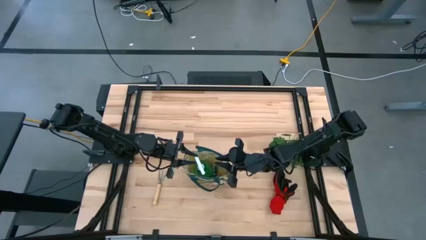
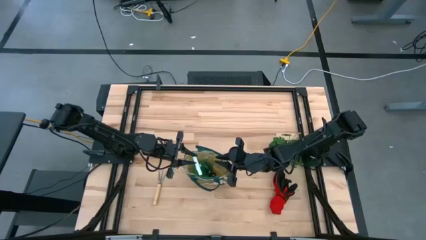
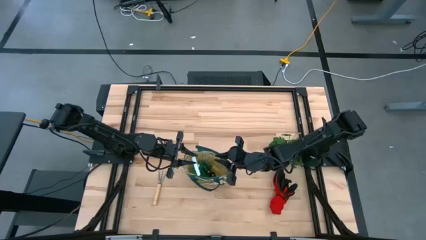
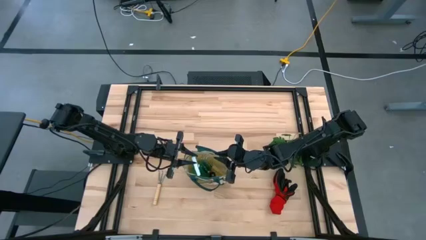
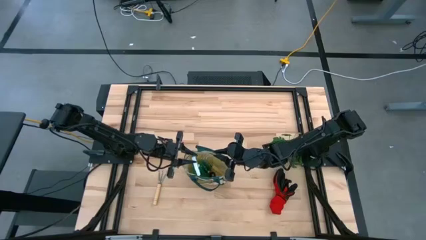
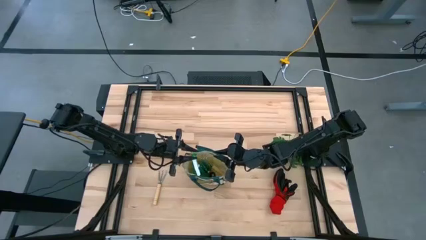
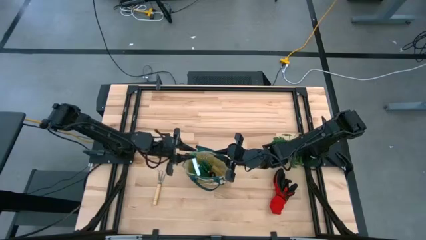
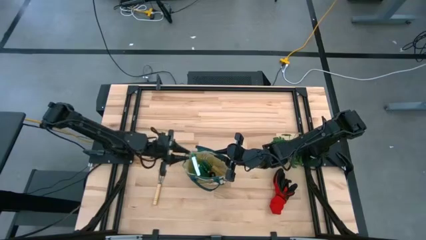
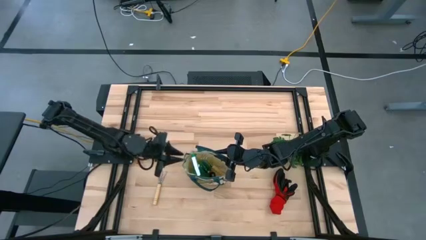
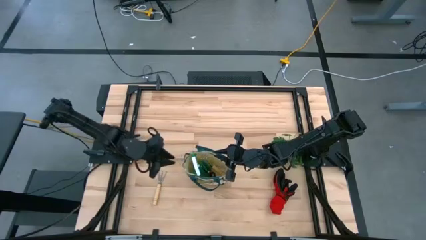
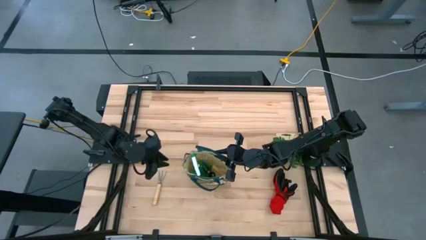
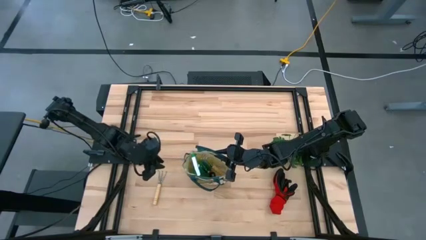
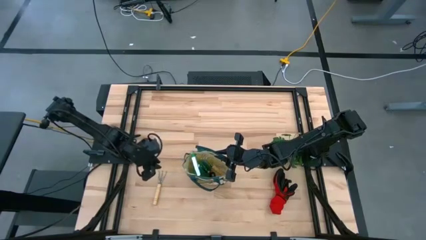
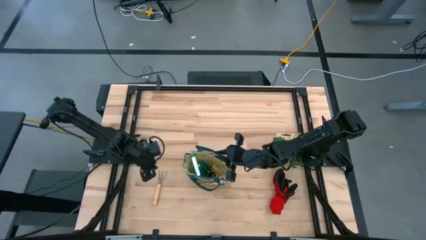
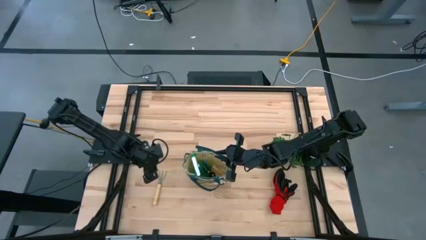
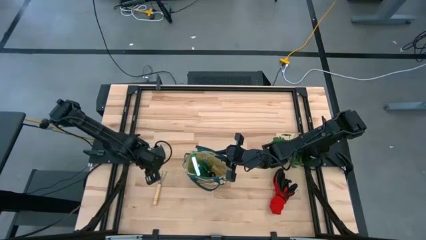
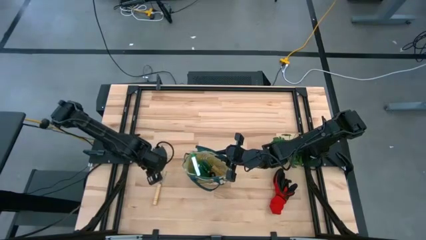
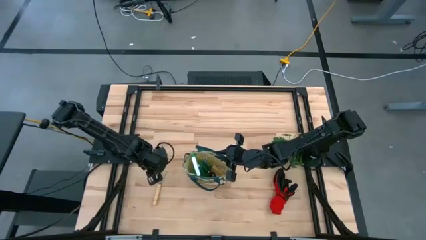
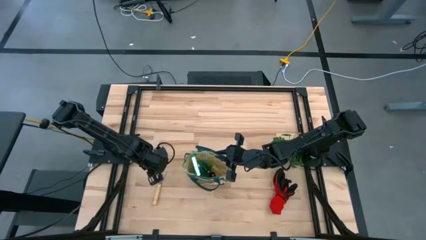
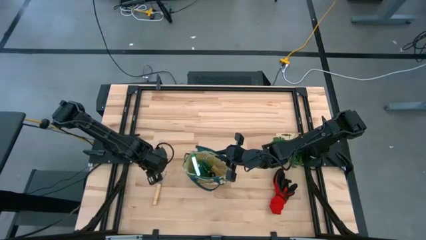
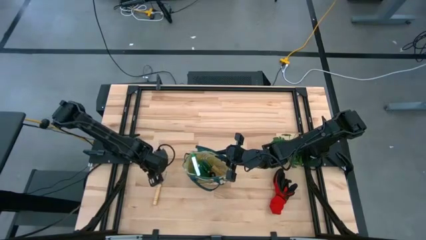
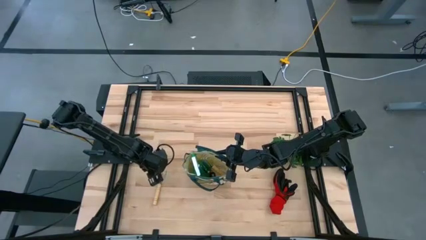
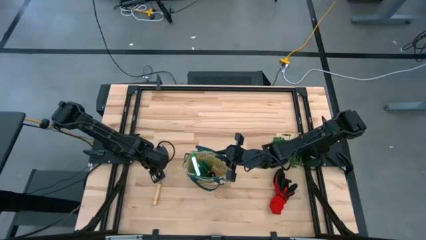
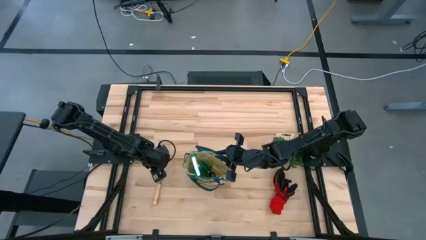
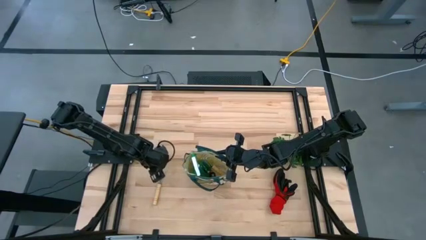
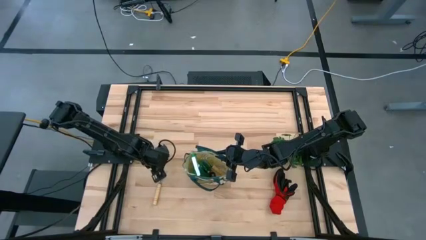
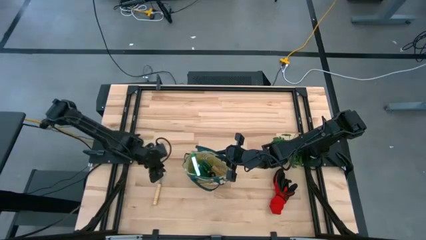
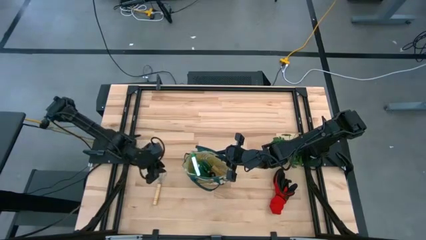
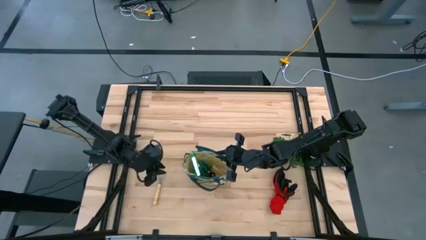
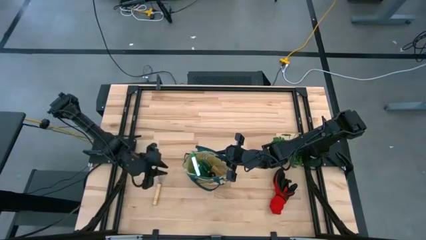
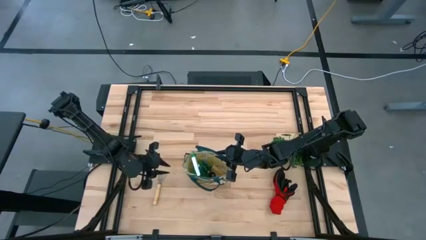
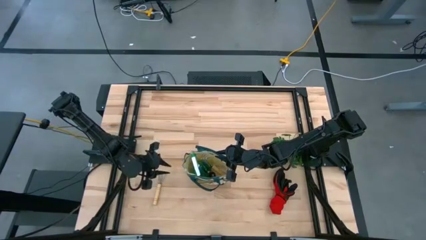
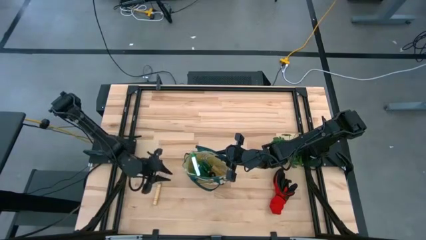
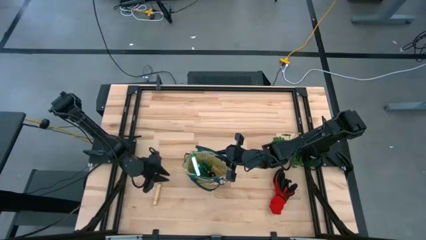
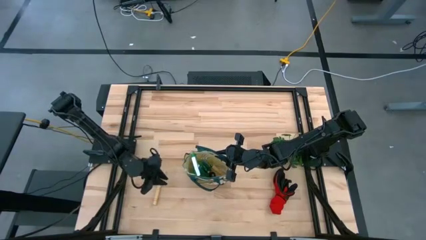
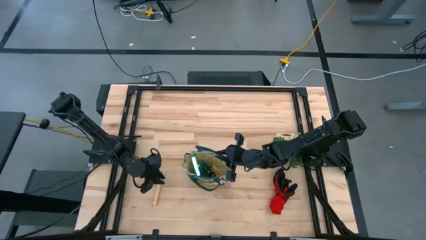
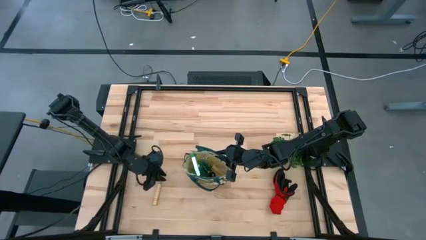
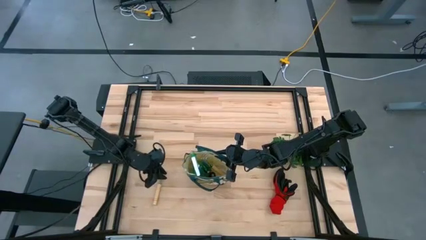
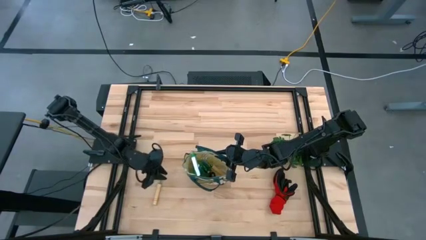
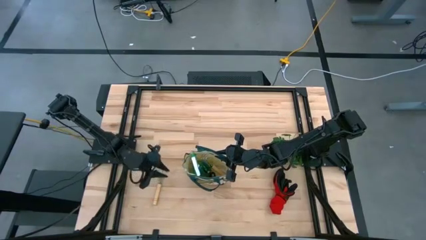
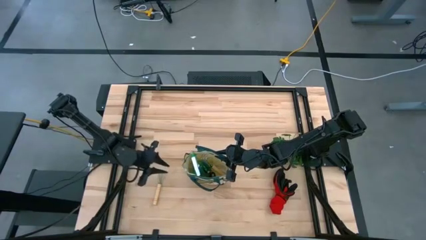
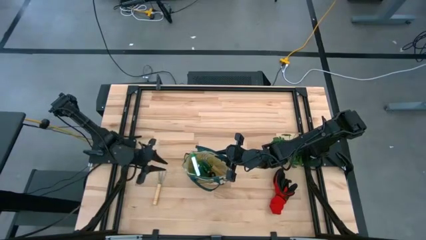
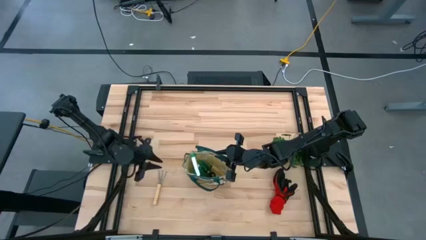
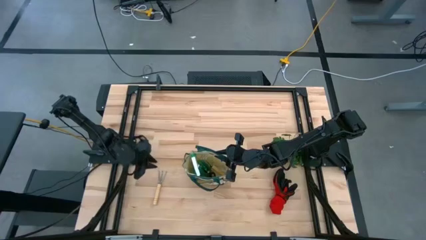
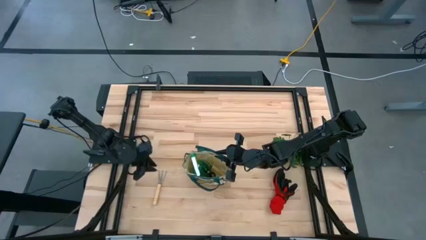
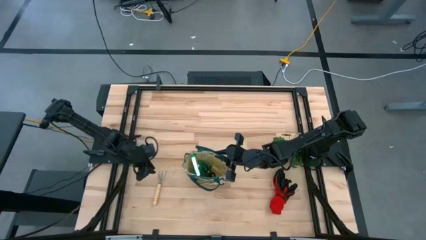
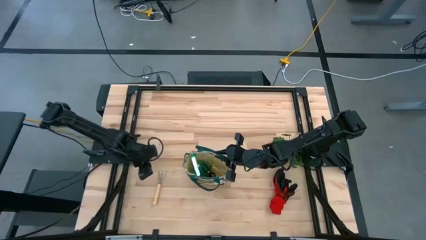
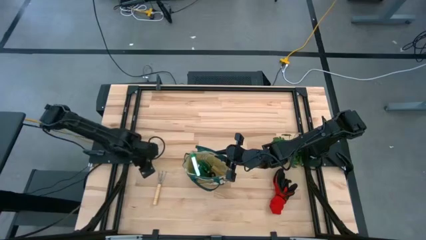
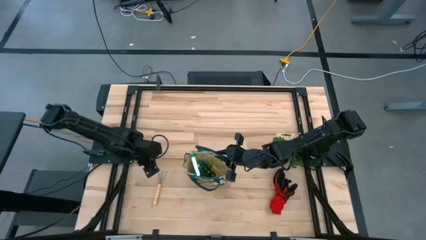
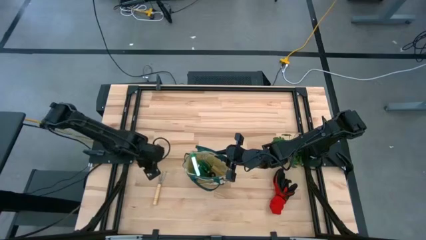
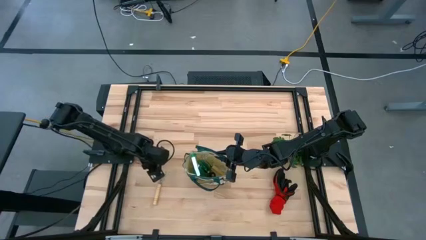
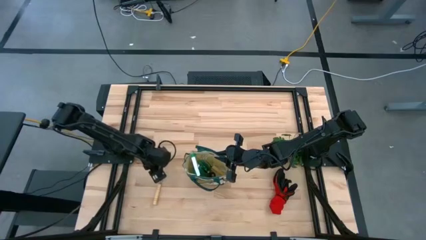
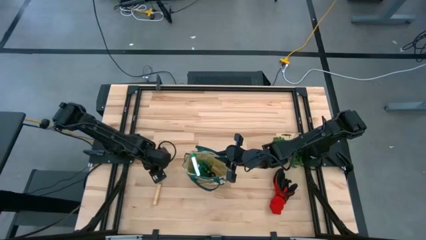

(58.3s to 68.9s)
Task: Pick & Place Garden tools in Gardening bag
Put the brown hand rake into the gardening bag

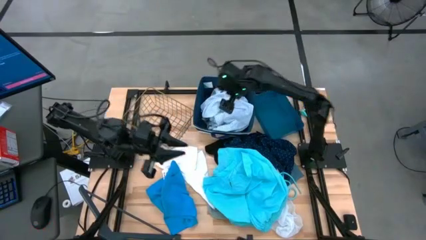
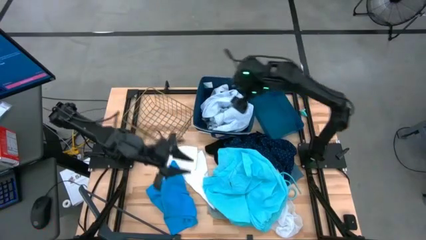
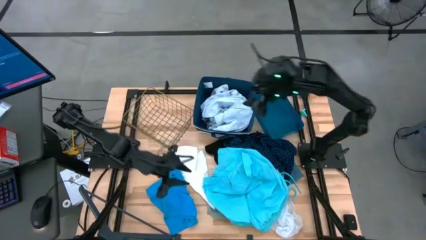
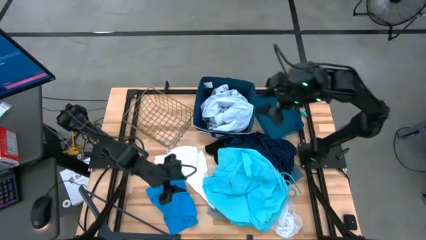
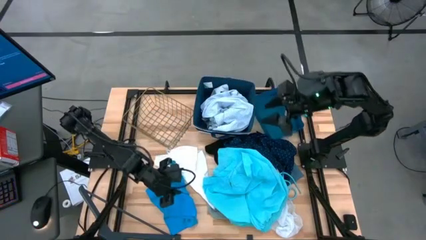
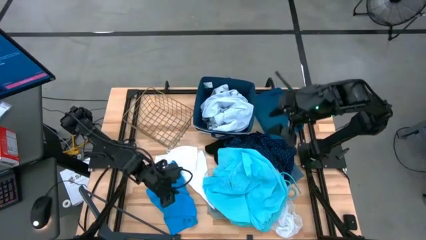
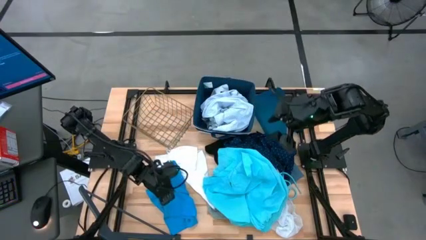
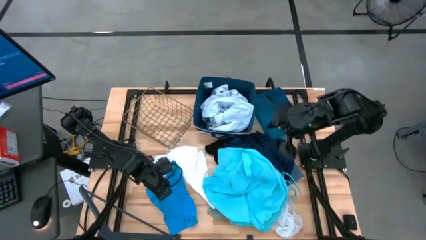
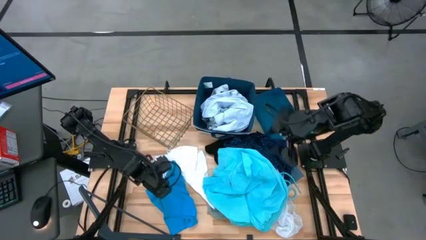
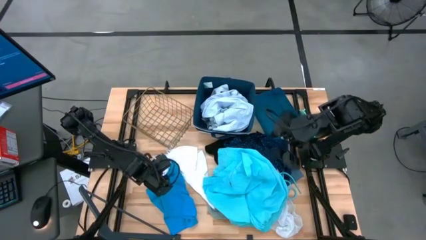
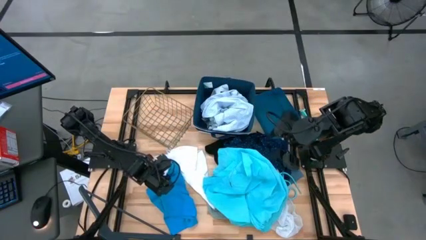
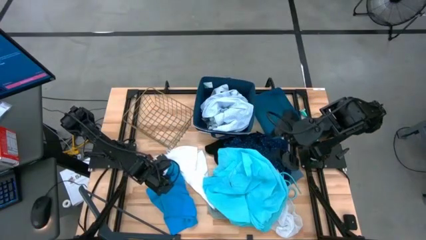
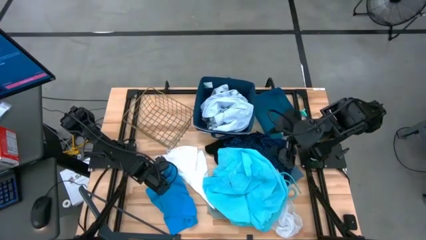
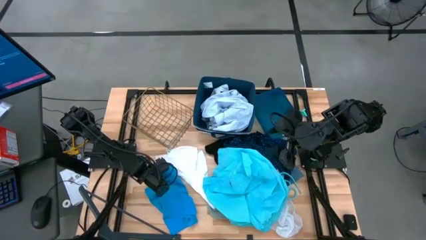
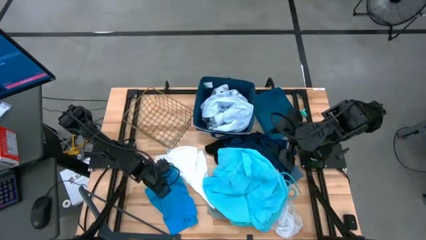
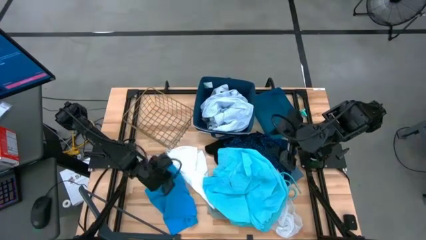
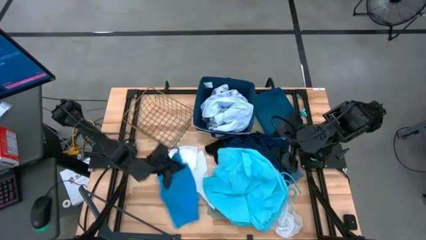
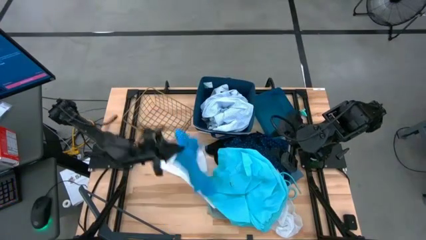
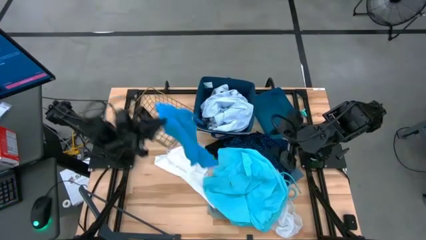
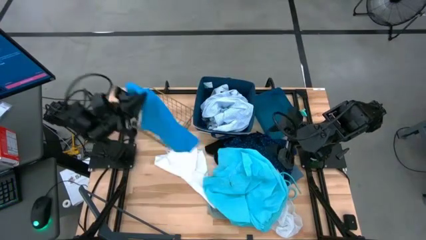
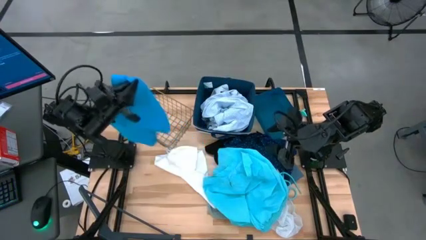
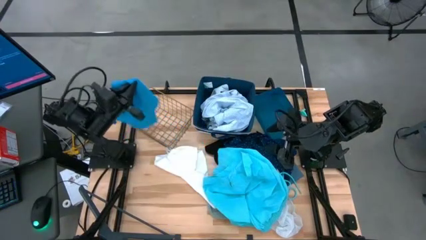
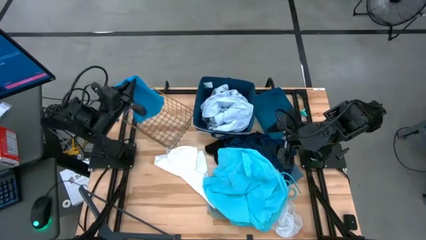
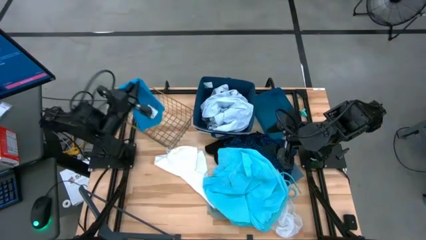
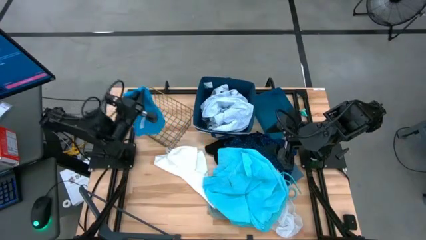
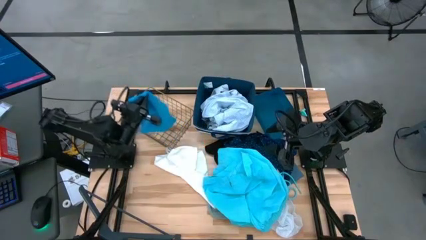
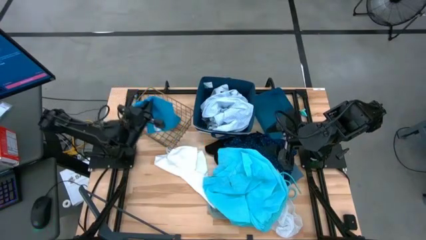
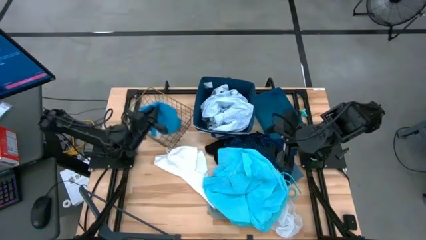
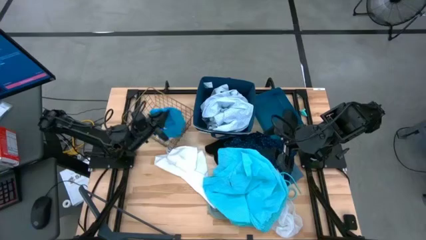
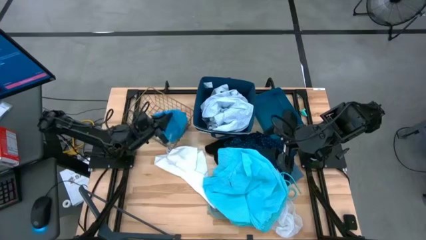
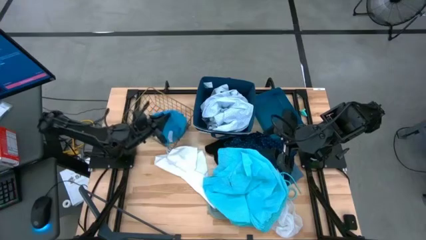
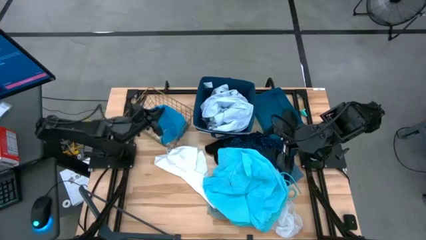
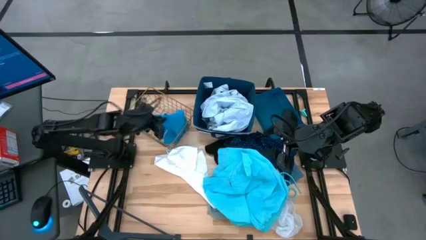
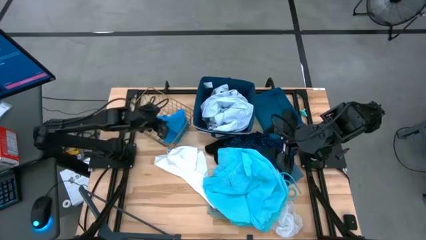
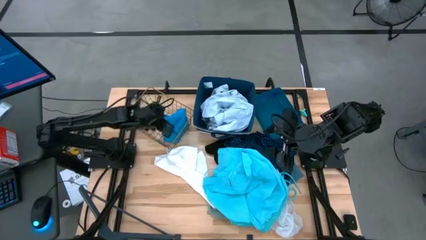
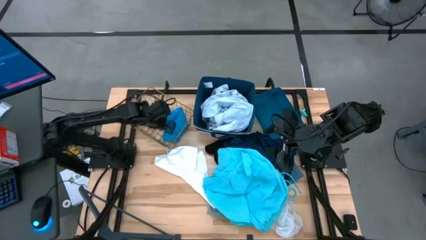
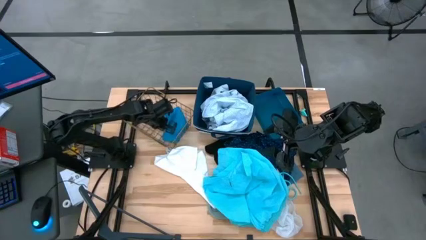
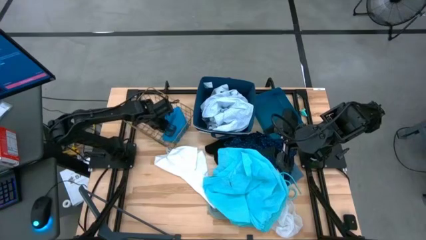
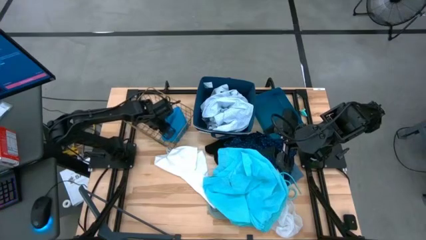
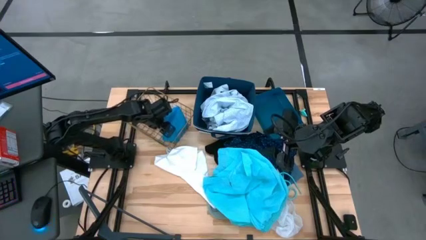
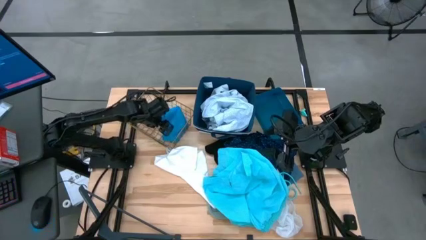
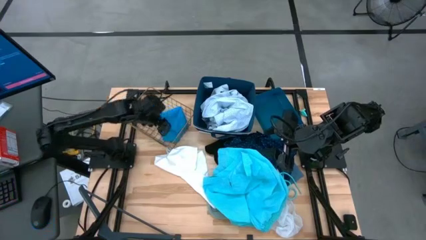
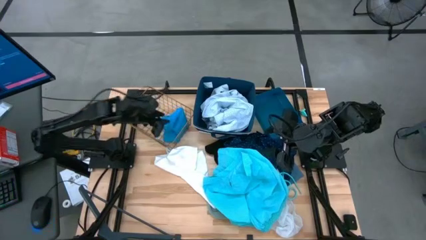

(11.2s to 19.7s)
Task: Pick & Place Cloths
Put the left blue shorts into the gold wire basket
